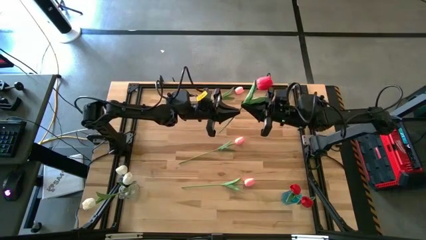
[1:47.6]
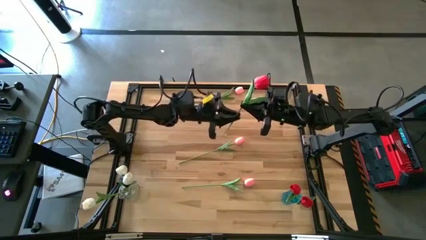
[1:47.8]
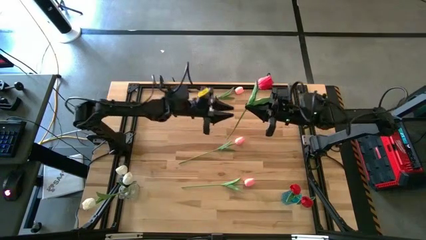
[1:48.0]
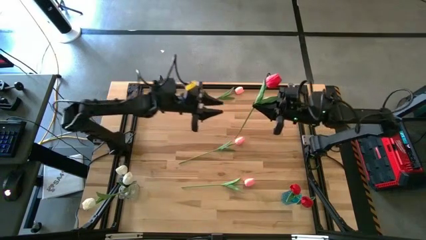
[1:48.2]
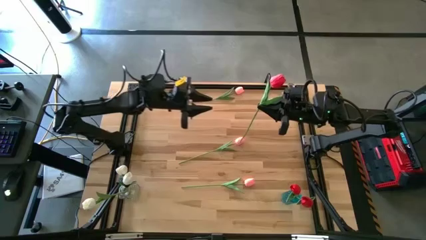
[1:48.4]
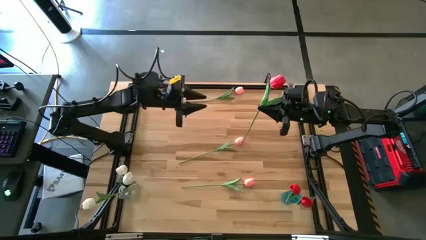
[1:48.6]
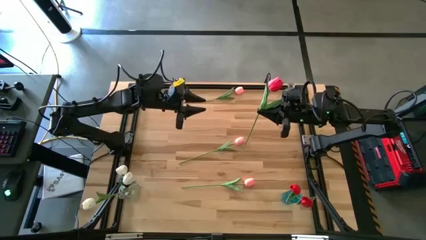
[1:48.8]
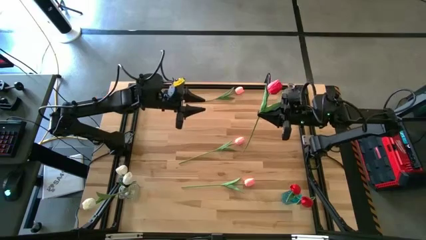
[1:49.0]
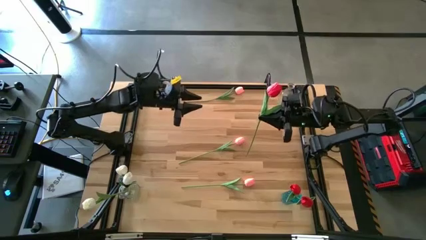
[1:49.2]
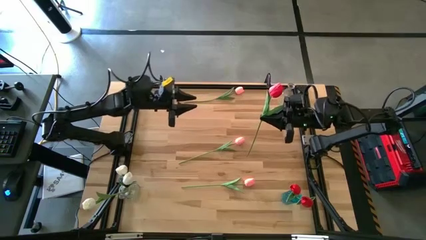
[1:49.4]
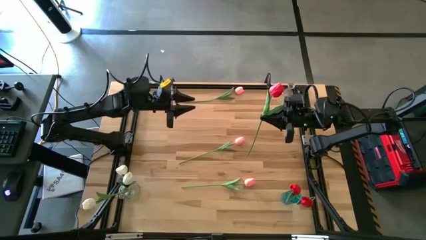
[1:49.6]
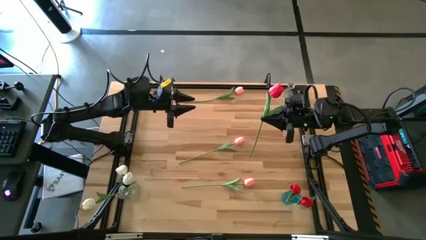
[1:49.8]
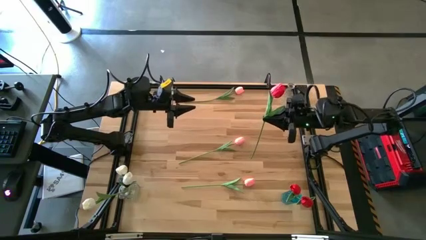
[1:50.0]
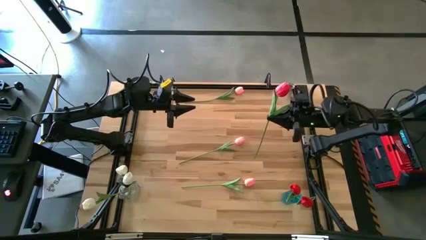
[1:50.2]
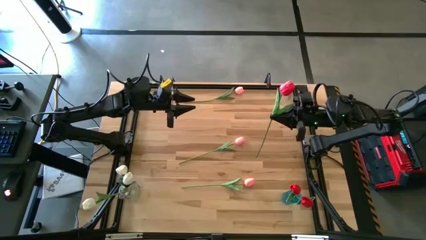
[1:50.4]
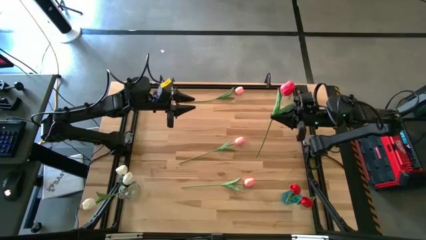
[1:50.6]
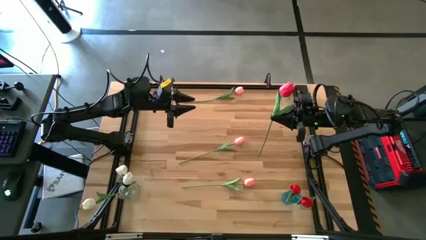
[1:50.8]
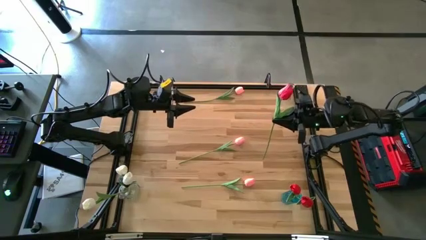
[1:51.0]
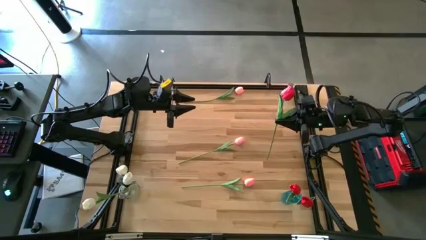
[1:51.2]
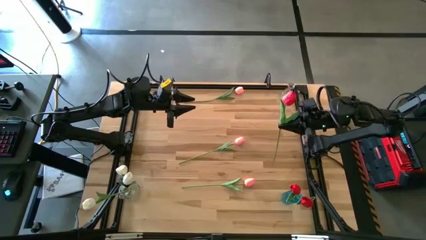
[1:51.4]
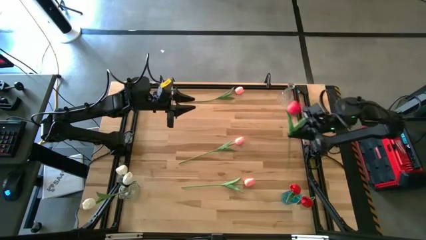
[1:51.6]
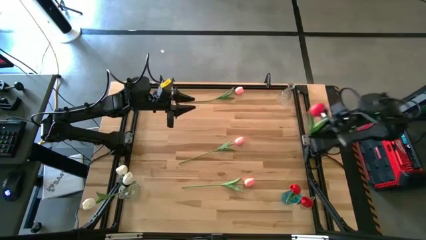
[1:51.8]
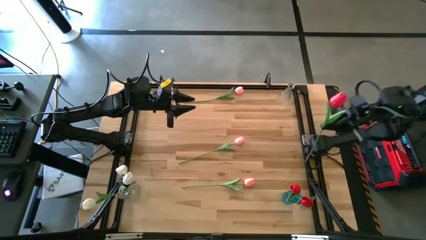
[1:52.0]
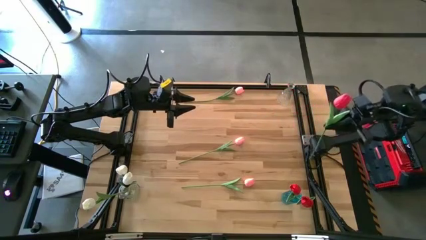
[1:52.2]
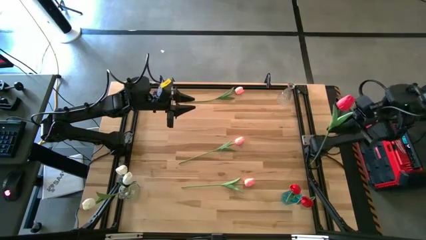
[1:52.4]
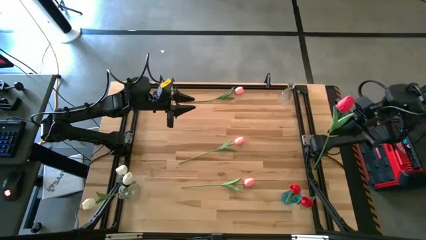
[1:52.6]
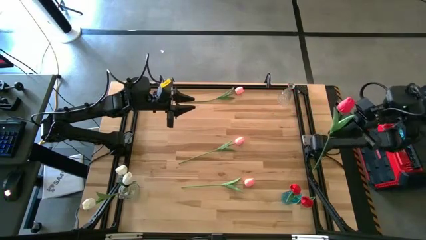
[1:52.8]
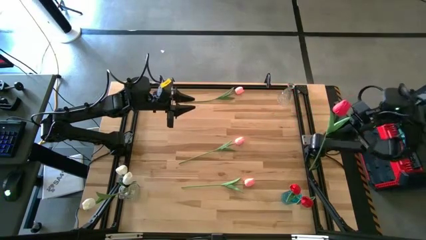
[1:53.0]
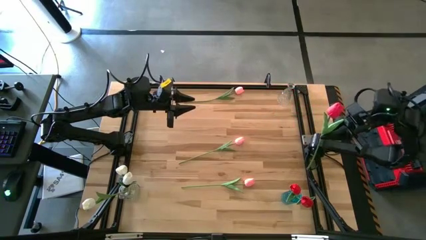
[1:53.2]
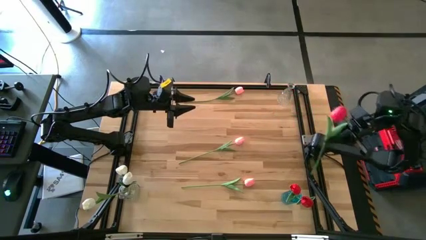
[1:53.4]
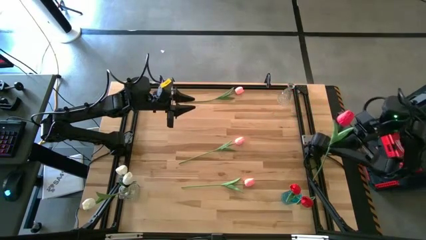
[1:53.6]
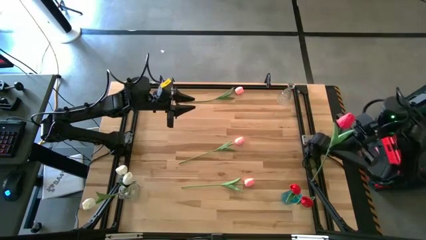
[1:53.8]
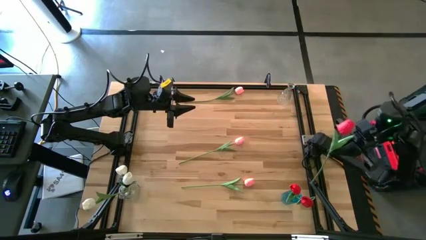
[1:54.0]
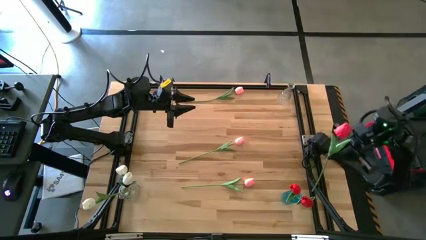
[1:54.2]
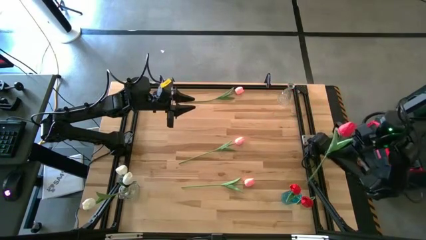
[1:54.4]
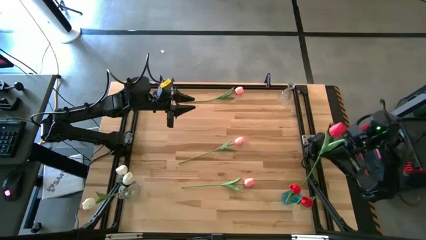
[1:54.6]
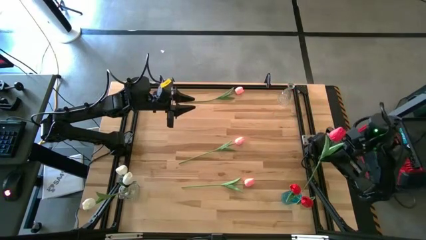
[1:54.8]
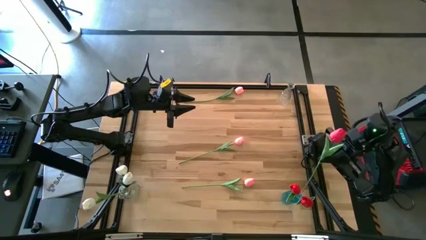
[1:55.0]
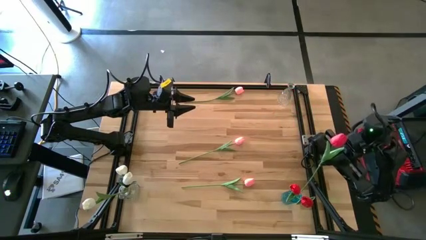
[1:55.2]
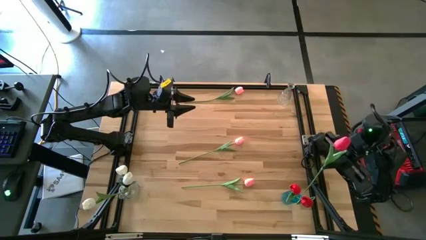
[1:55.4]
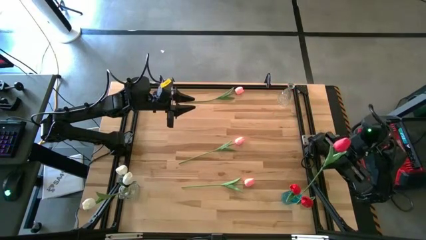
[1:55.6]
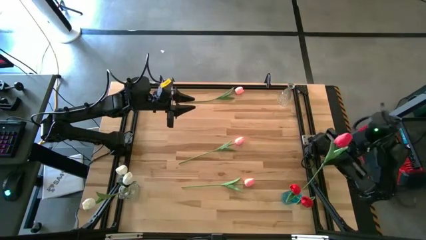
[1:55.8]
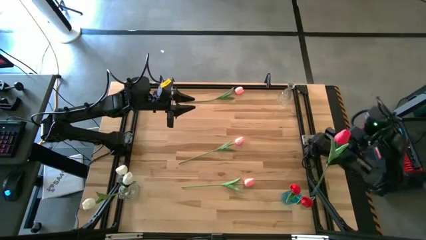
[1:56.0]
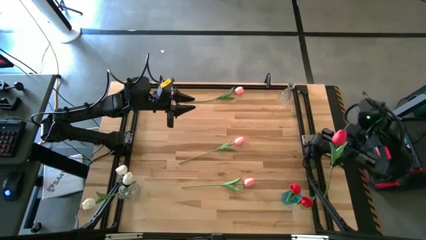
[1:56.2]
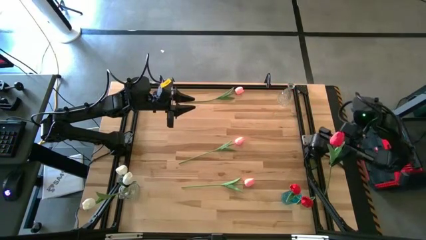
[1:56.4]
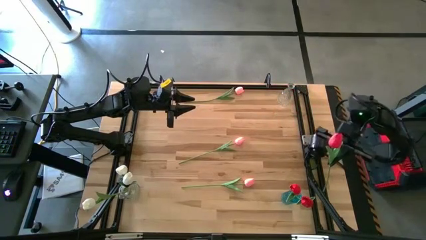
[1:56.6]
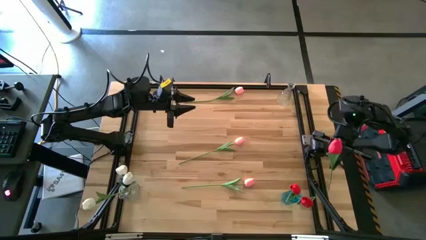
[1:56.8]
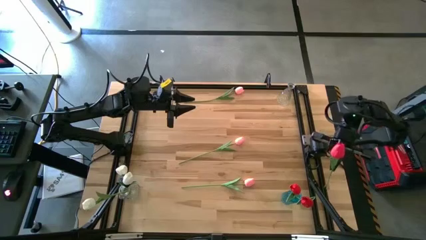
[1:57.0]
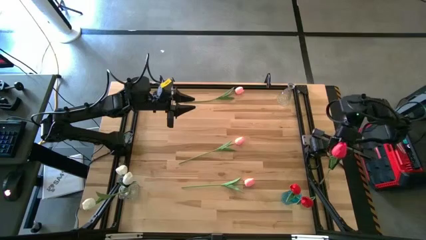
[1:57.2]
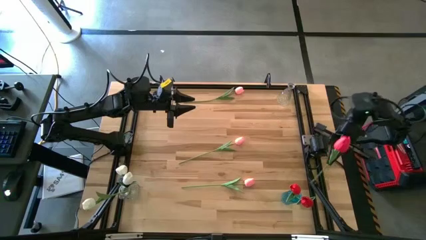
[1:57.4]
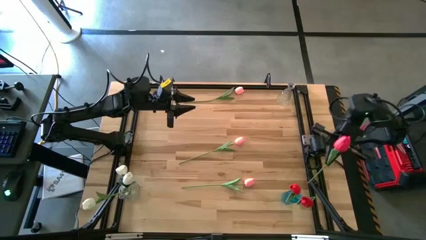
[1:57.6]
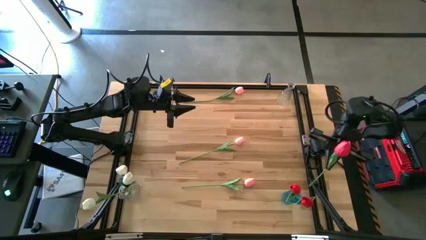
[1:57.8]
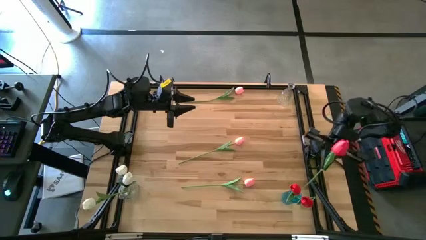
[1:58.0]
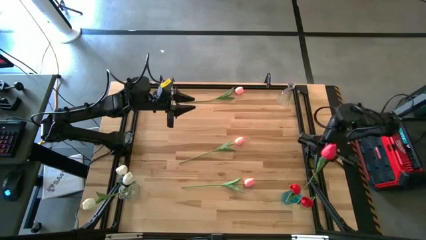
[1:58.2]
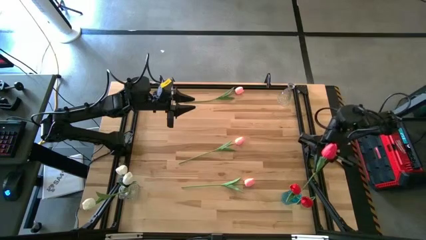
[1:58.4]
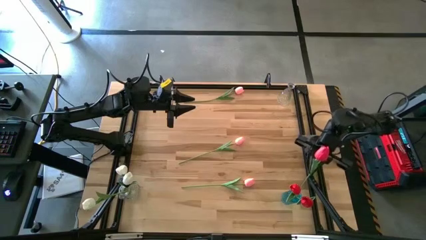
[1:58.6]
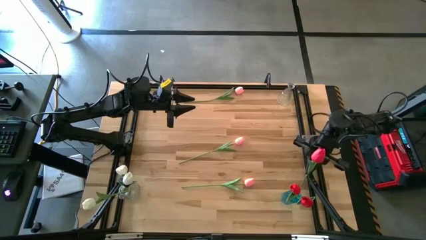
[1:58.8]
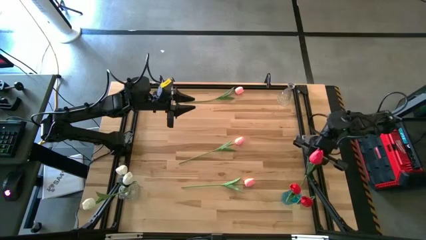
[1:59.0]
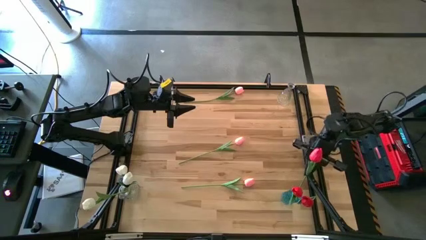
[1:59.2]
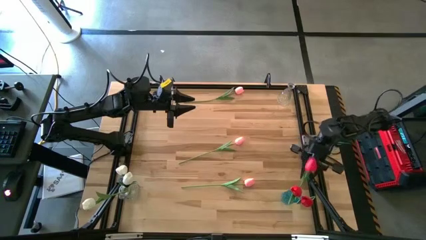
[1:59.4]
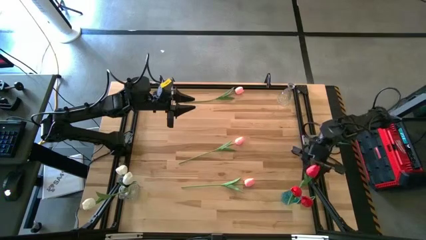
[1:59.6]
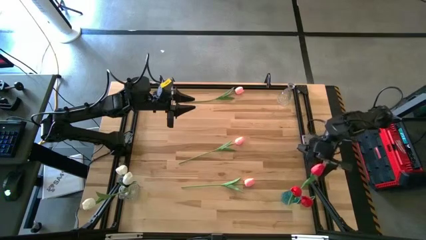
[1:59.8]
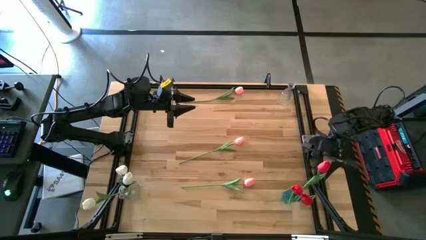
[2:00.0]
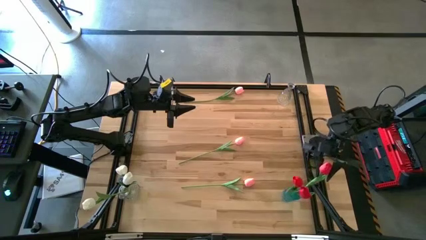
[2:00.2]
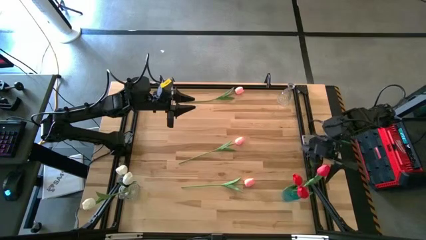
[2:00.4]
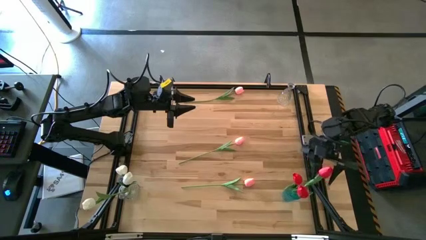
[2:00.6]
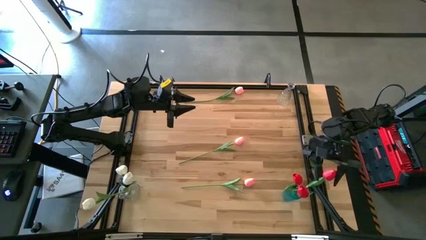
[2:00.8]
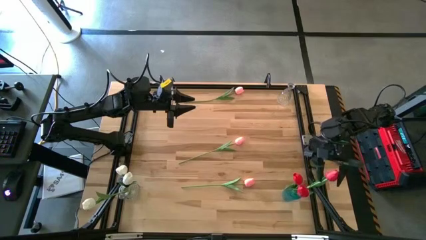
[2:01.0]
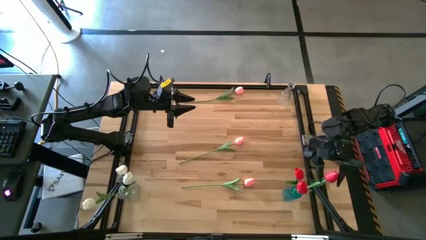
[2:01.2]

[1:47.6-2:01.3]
Task: Sort flowers into vase by color
Put the red flower into the blue vase

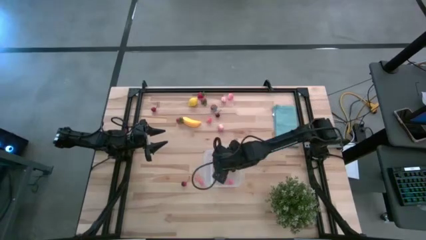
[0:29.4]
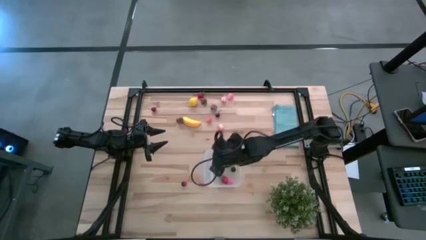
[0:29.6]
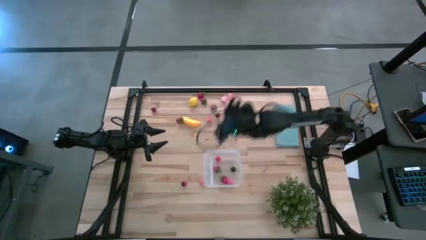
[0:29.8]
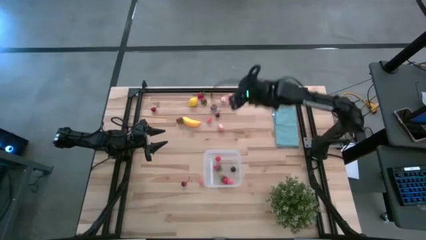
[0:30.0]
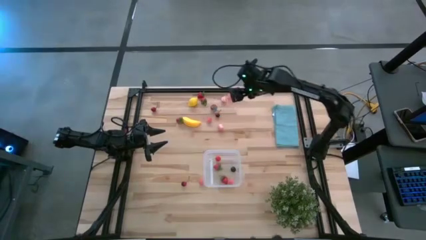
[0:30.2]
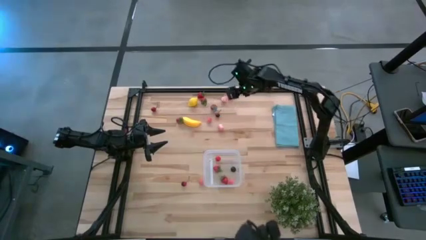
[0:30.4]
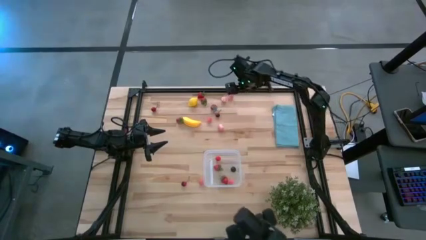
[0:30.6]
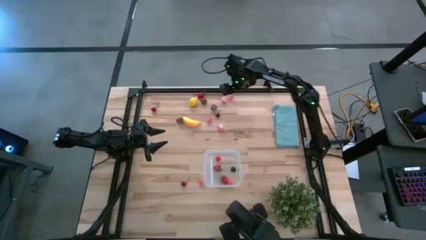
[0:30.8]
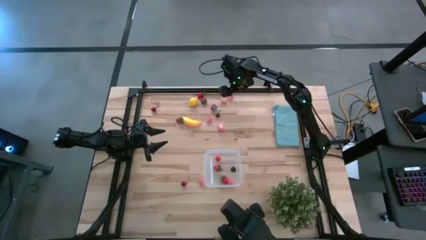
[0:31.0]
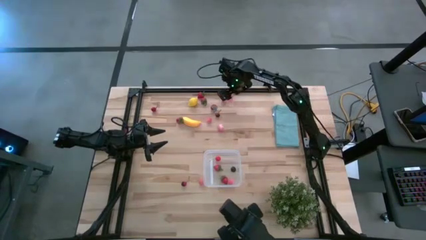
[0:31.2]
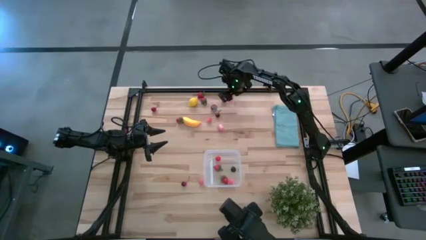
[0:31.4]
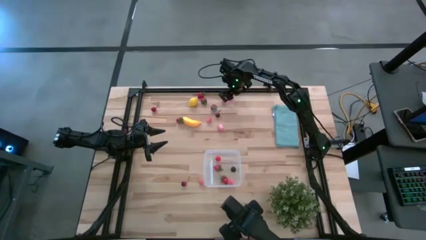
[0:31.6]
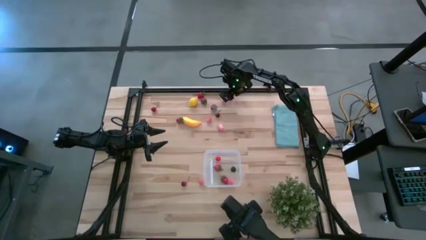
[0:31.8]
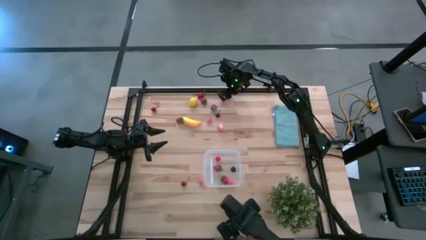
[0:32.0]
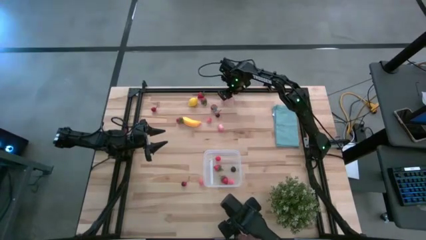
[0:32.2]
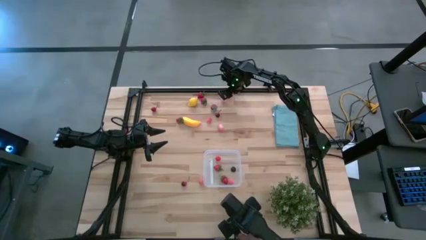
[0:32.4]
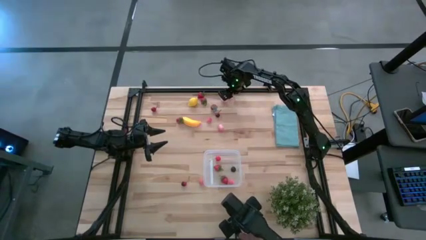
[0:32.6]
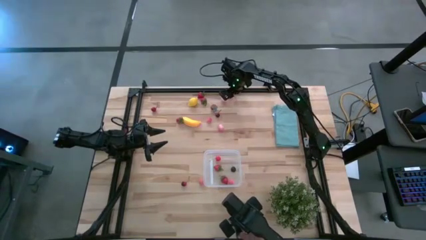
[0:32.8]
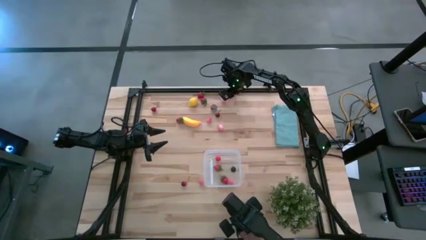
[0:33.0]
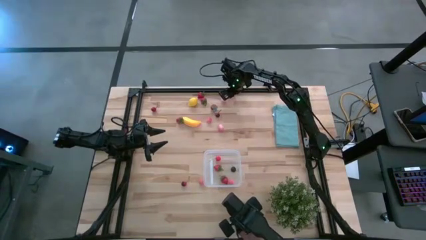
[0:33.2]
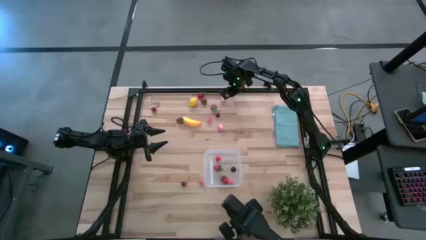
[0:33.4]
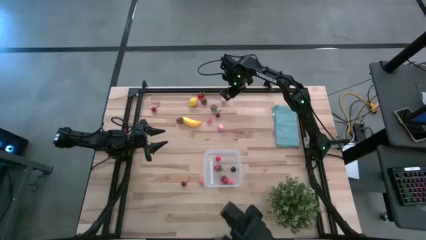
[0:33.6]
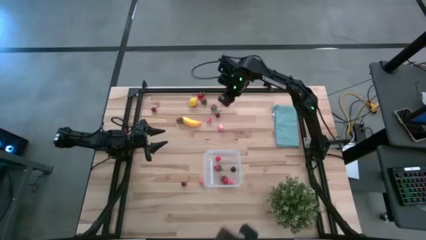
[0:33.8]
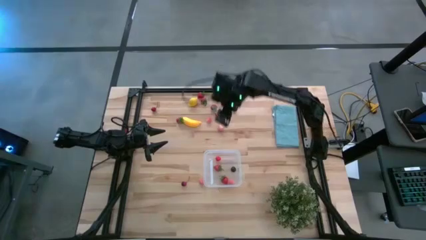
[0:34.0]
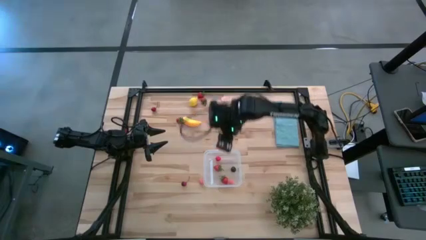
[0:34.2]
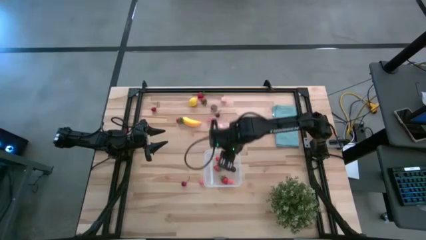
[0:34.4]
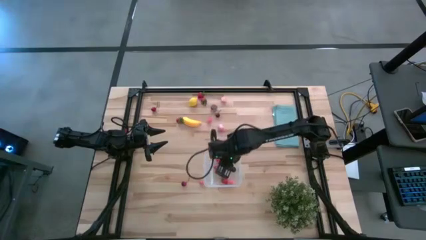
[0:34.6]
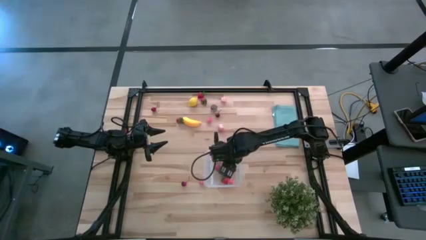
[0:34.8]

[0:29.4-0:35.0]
Task: Pick and placing Produce into tupperware
Put the pink peach into the transparent bin
